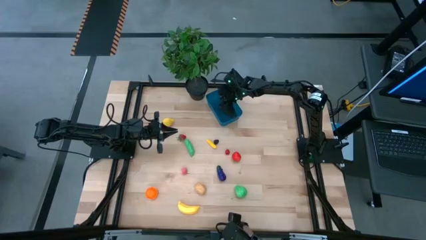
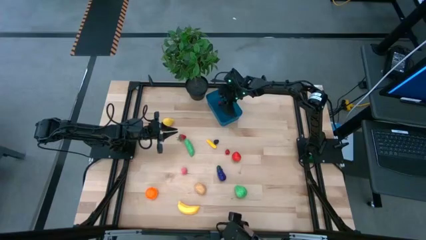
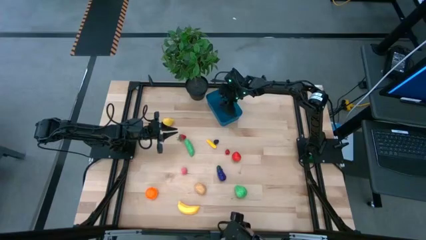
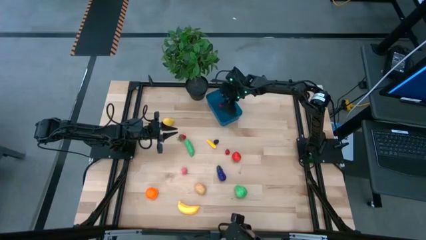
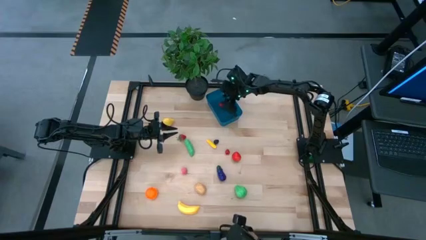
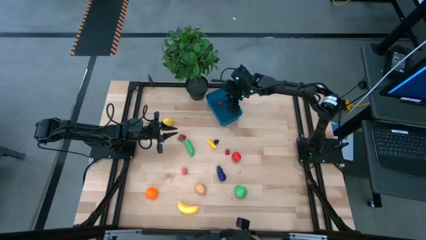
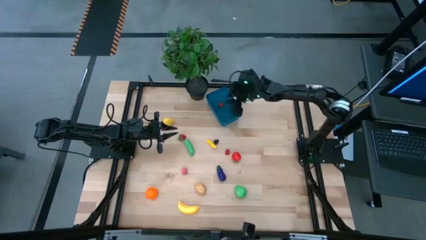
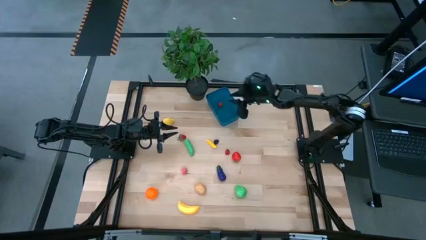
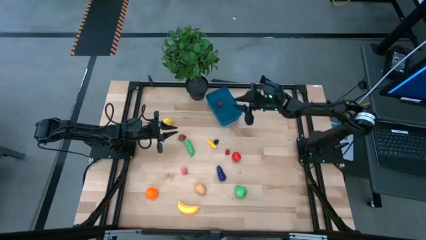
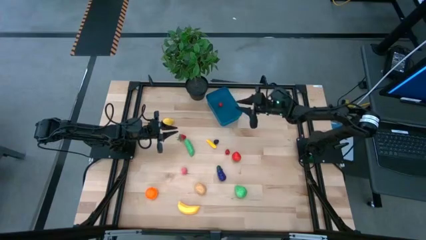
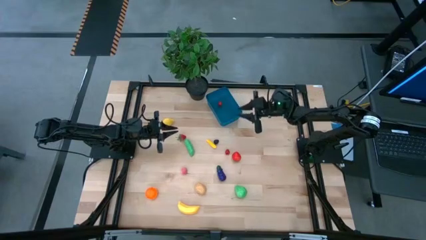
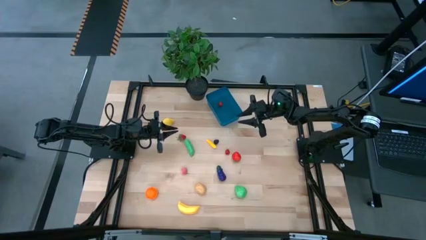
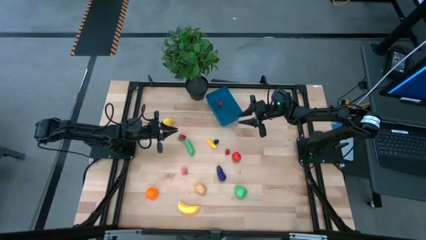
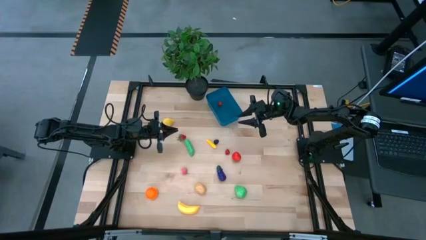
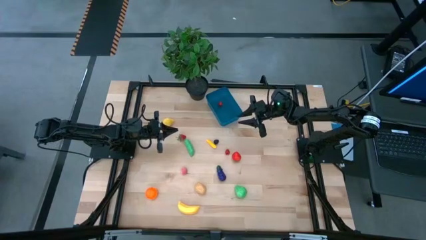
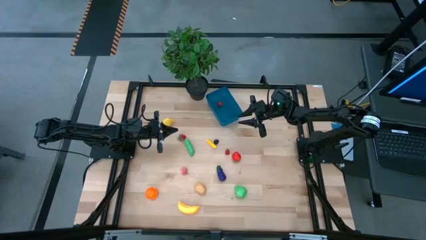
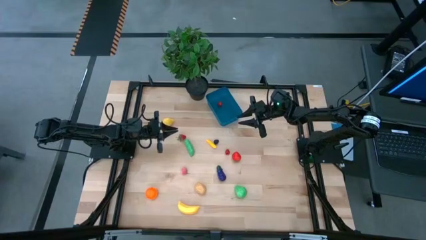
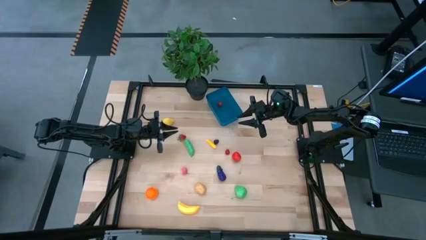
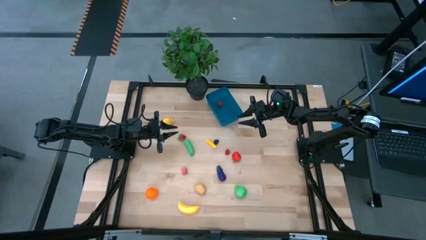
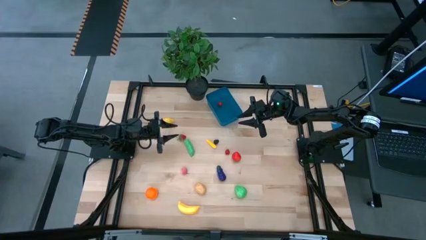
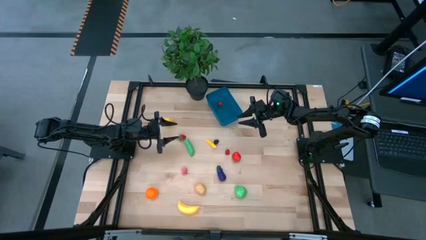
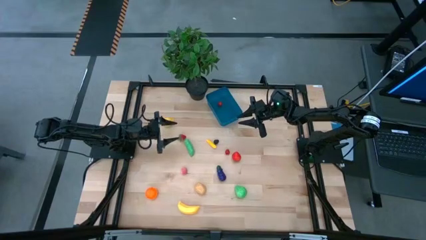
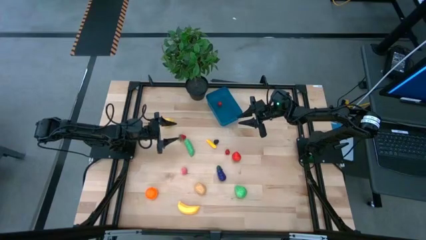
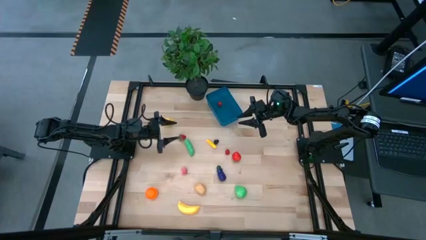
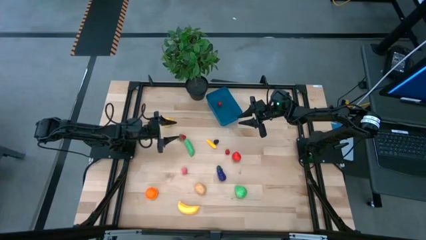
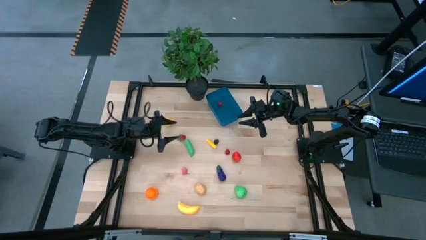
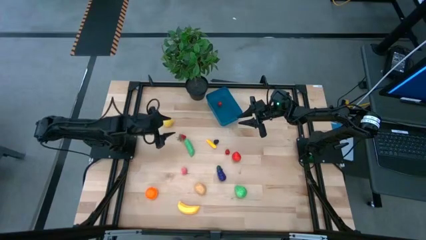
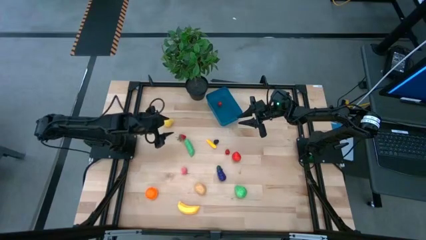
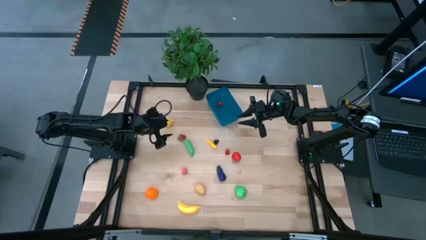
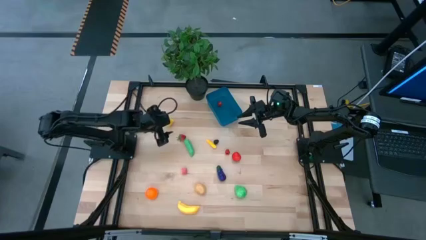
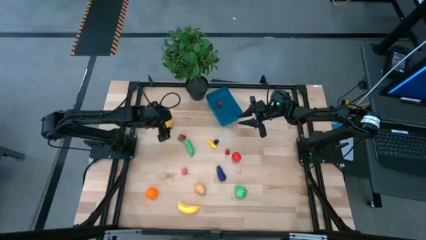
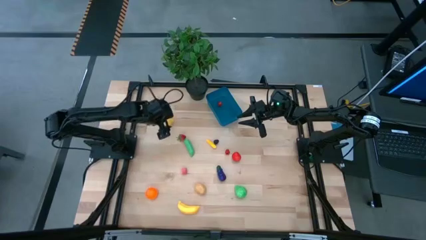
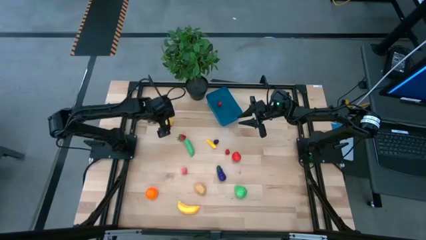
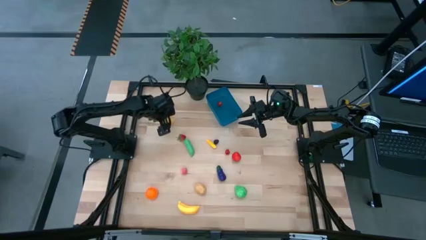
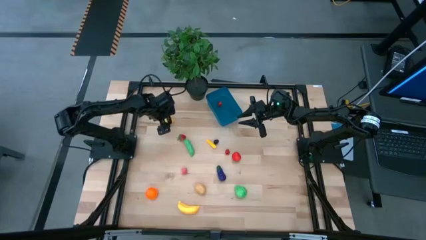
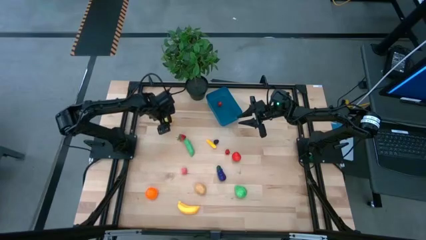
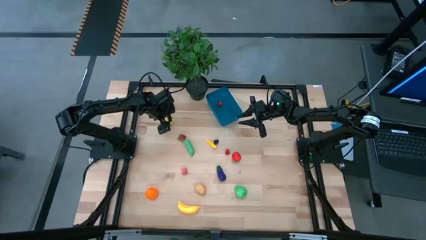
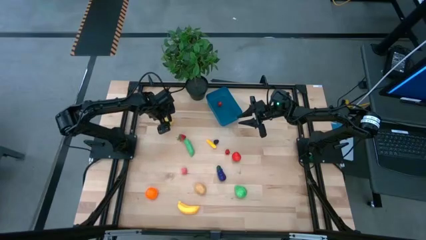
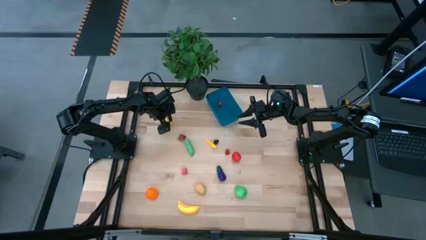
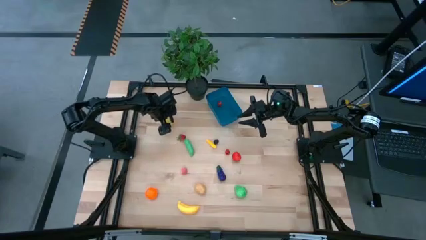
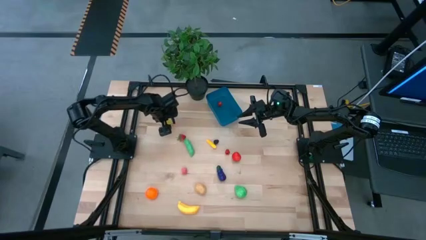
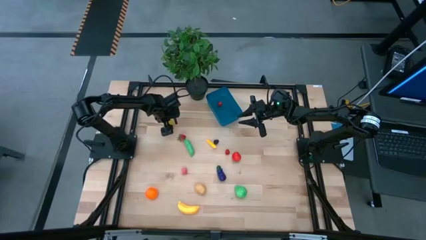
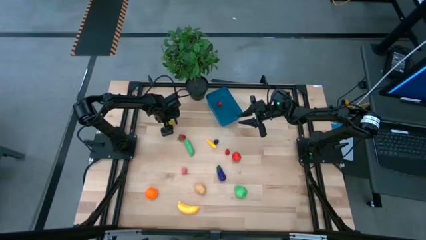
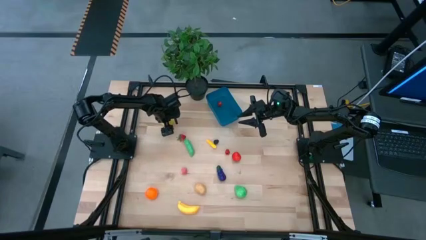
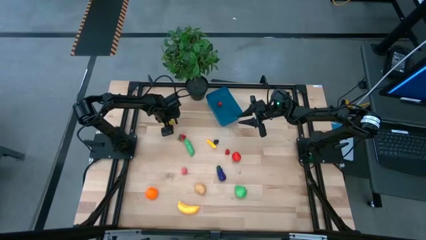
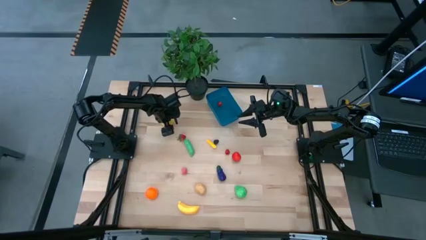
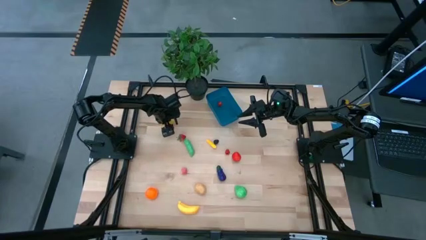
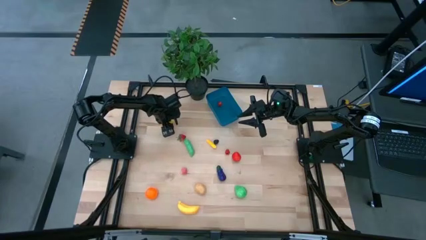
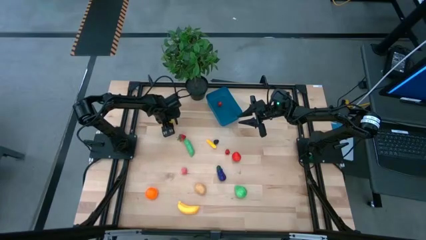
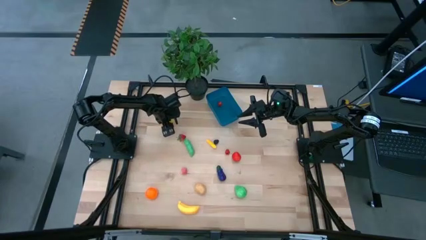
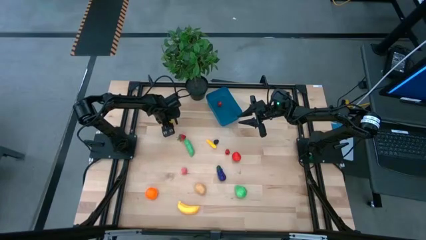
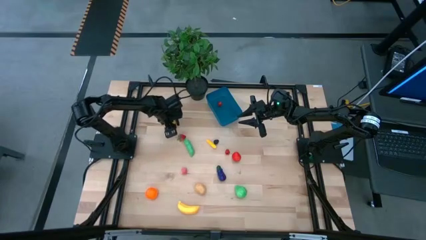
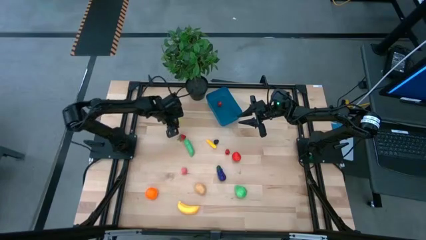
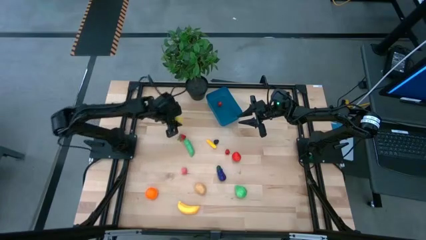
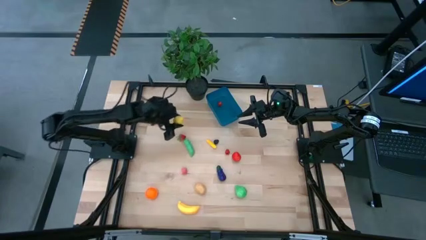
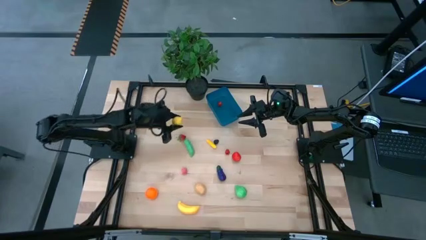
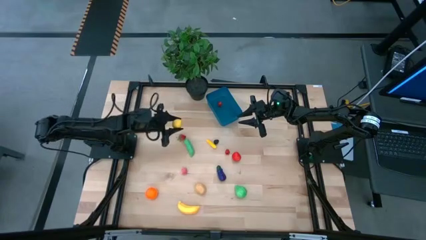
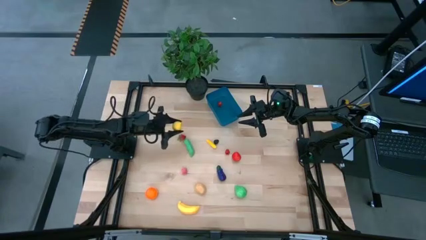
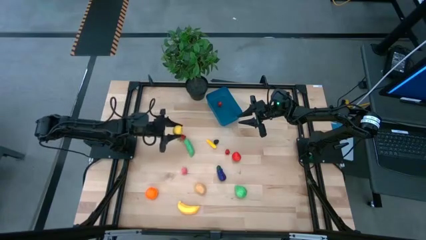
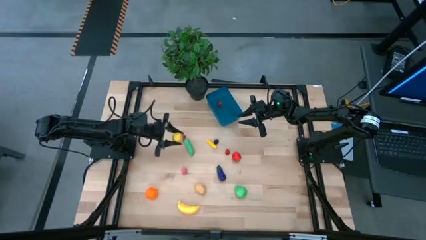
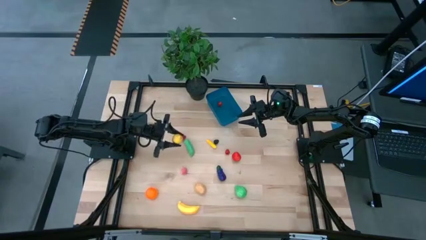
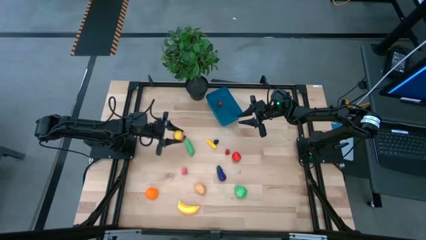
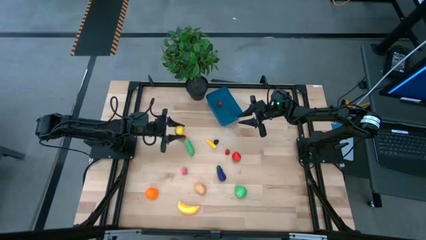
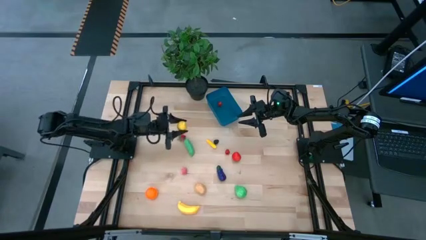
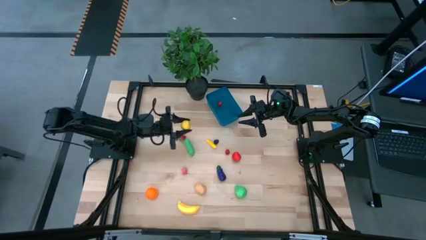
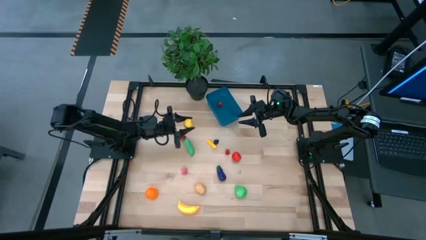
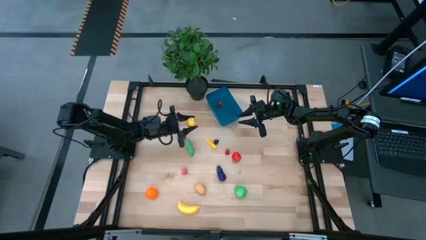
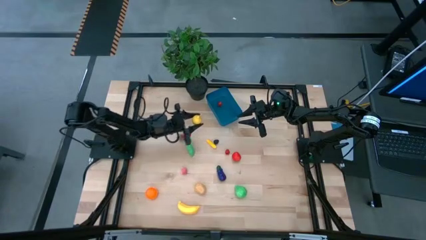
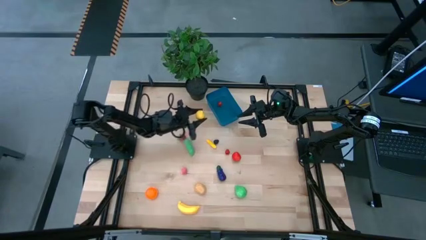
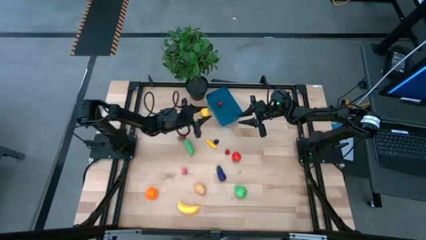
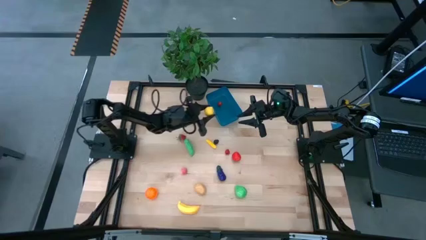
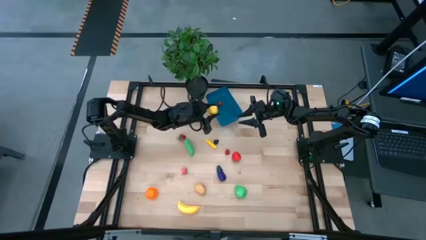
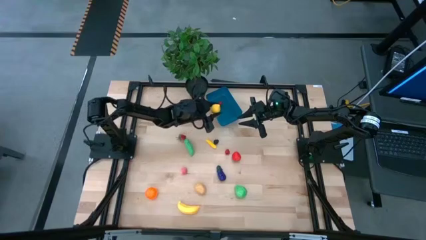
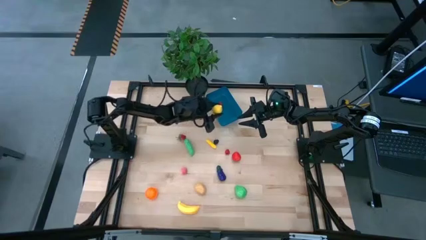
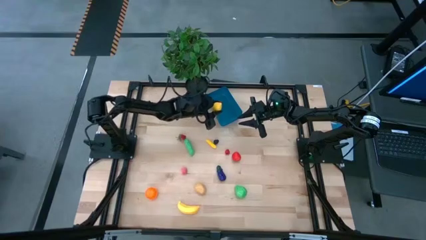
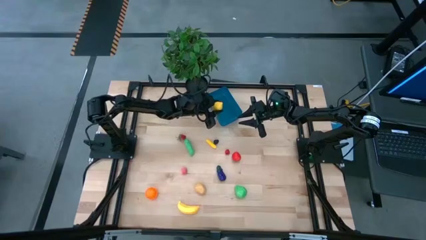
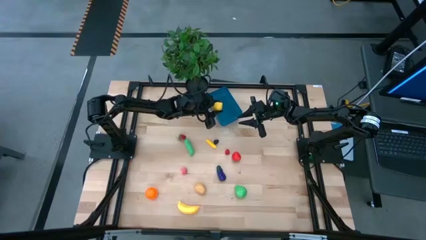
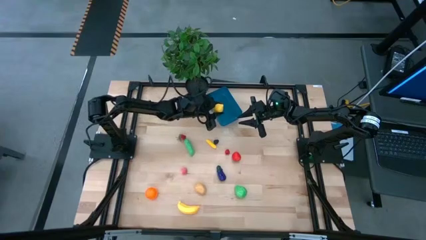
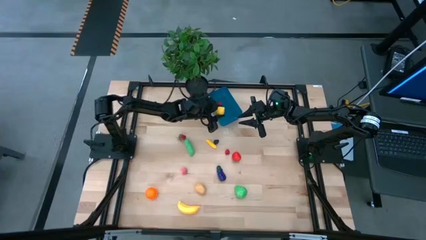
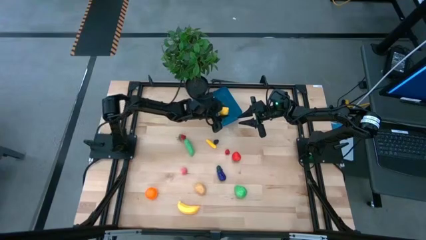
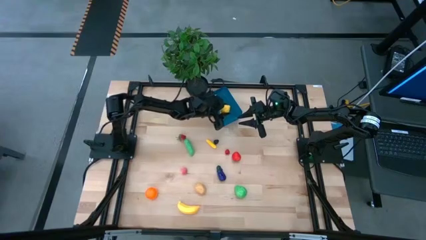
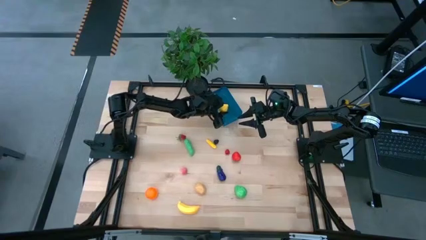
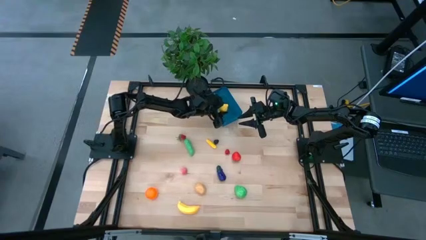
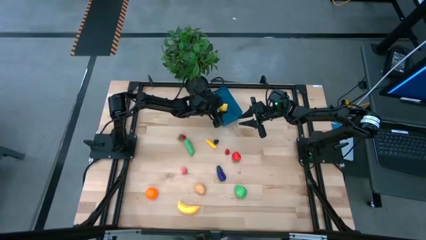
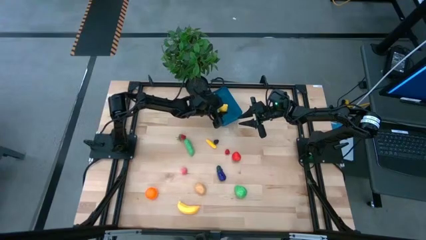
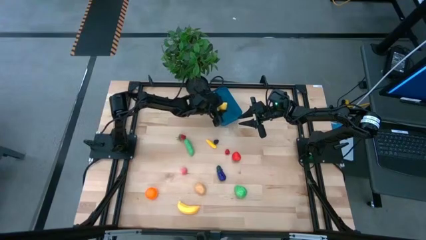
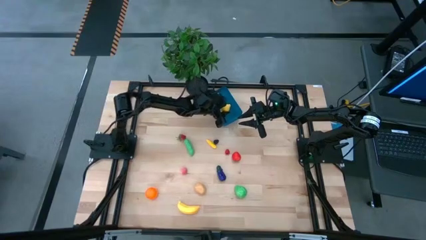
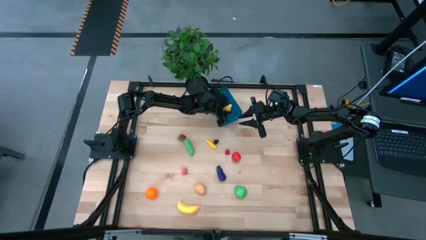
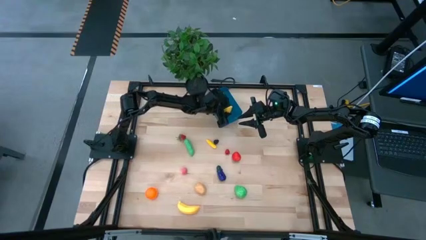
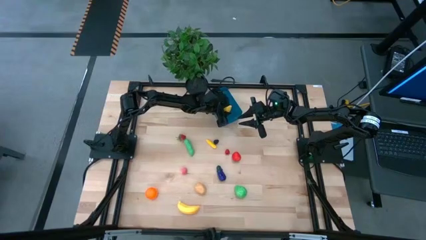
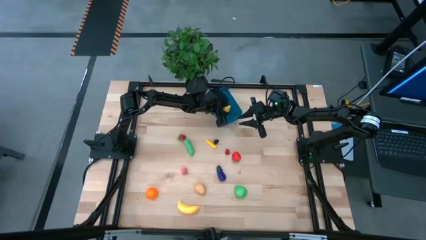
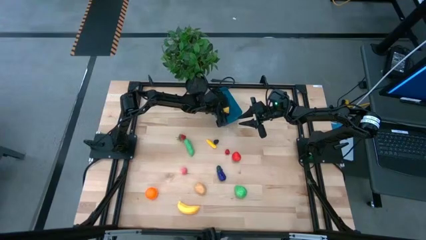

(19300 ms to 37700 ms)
Task: Pick and placing Produce into tupperware
Put the lemon into the blue bin
